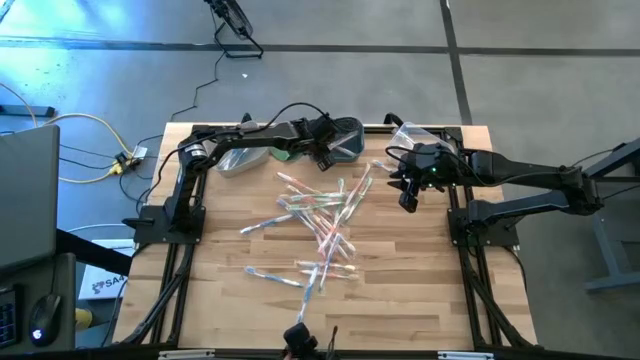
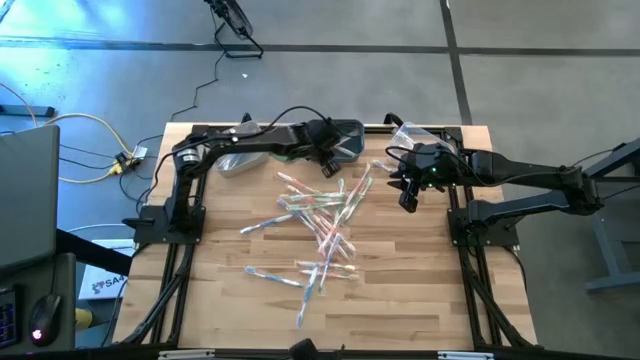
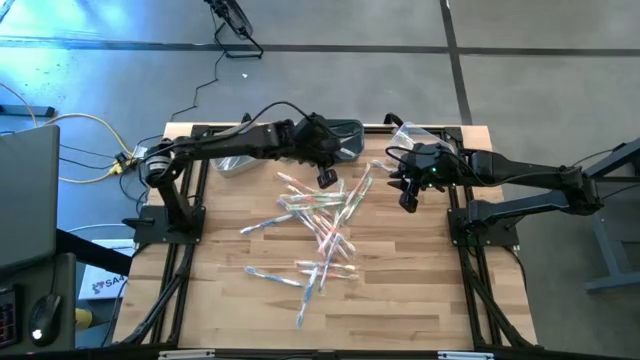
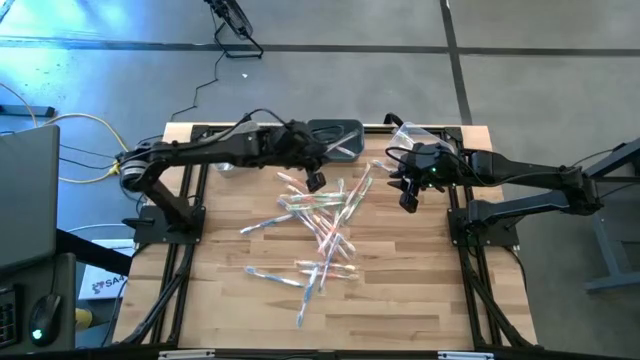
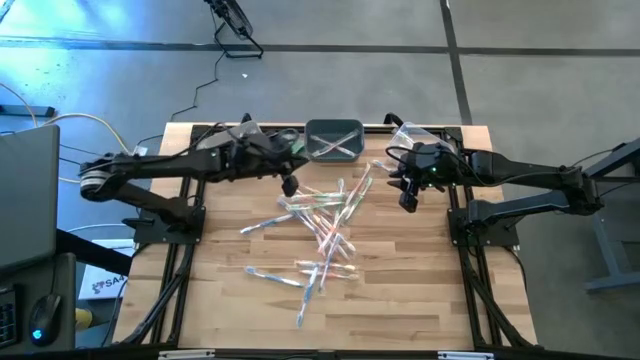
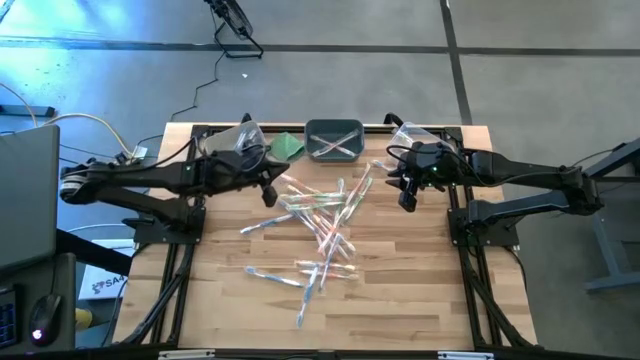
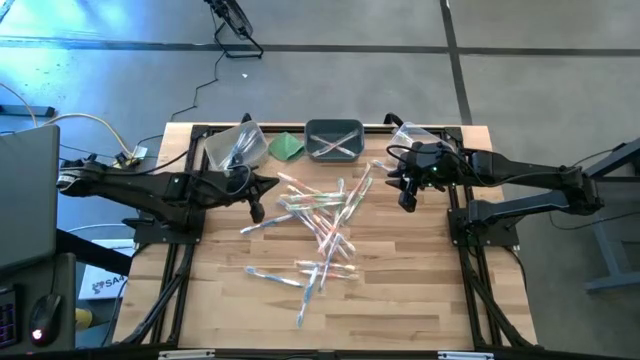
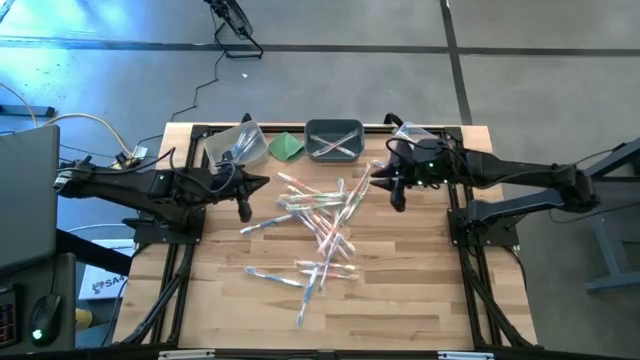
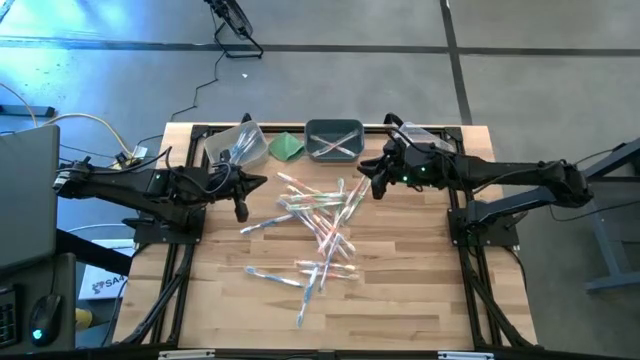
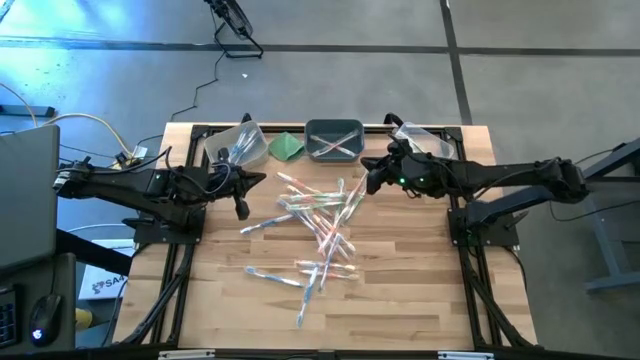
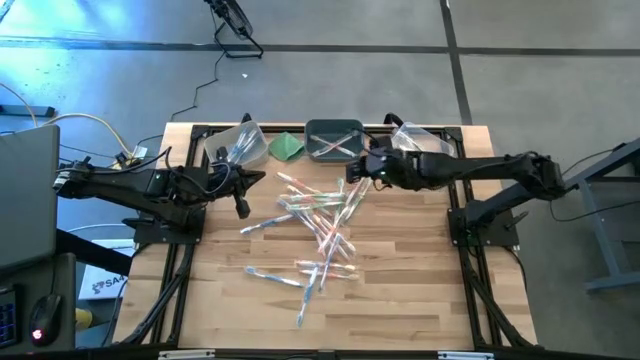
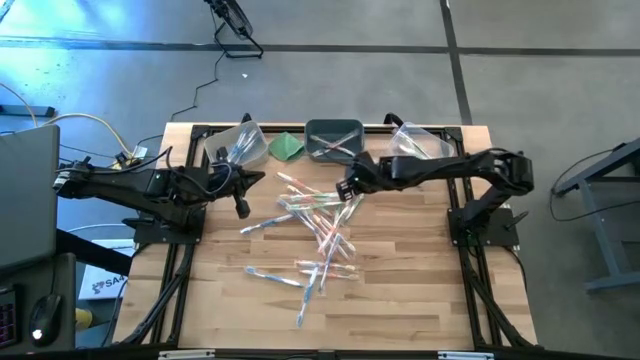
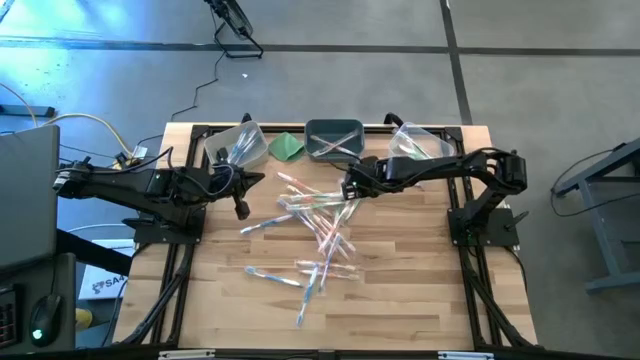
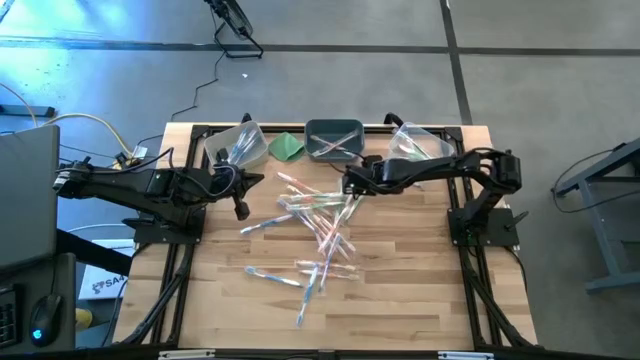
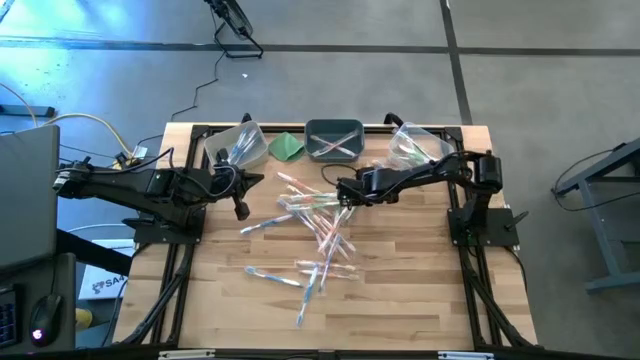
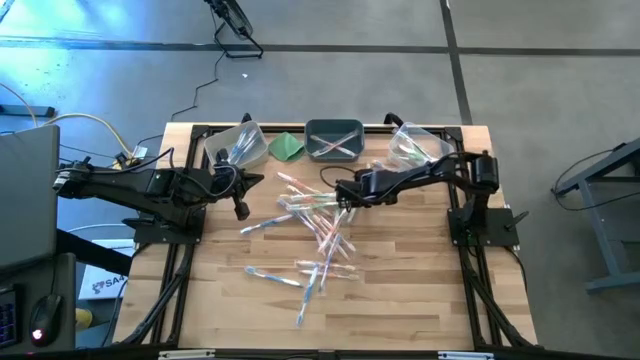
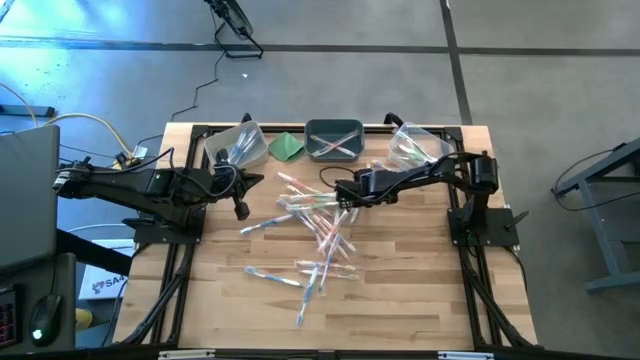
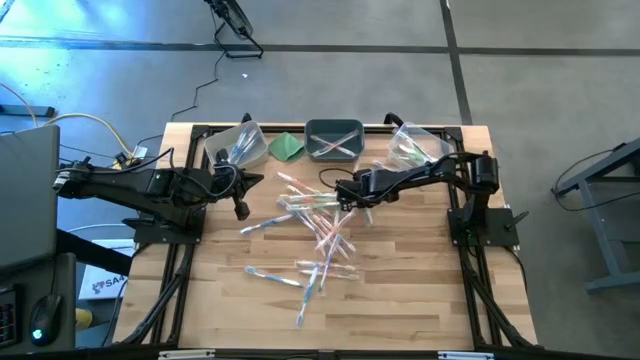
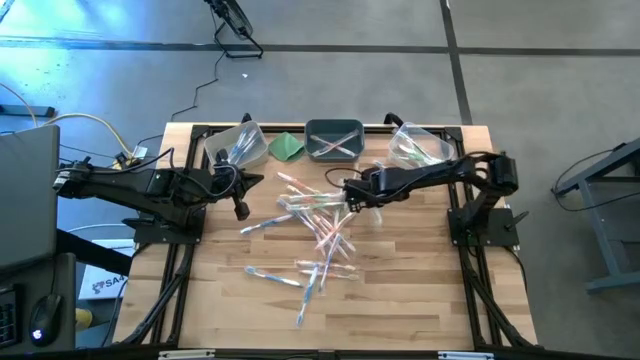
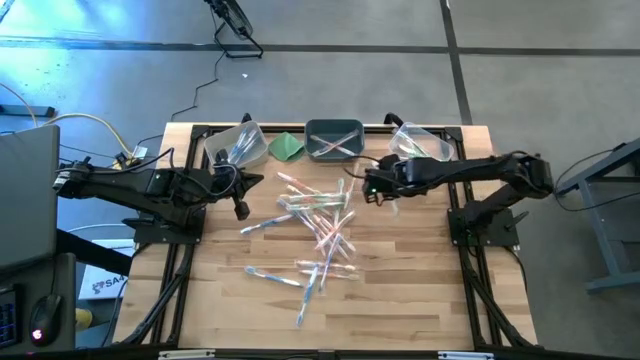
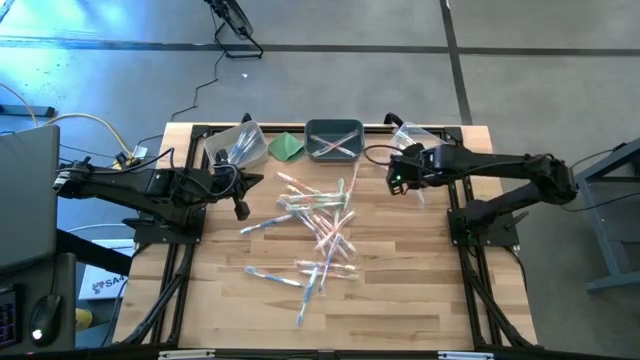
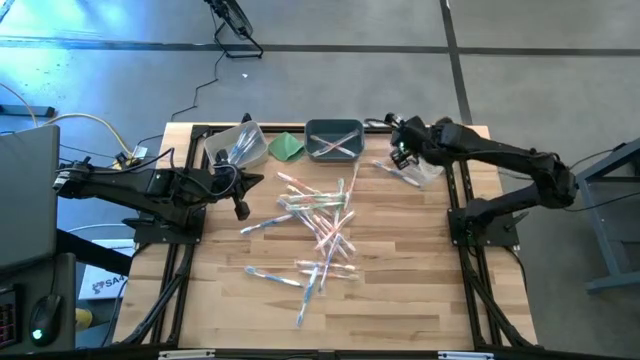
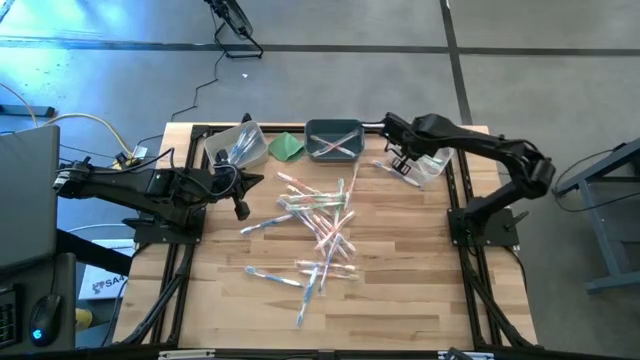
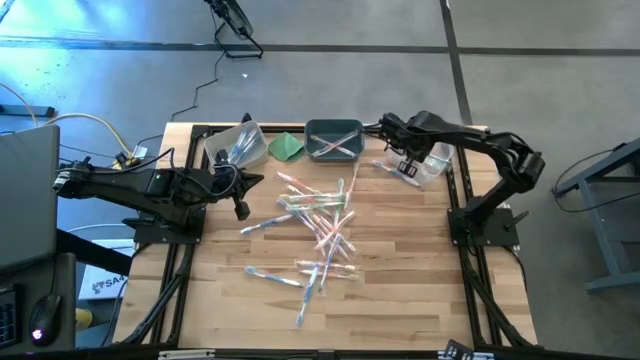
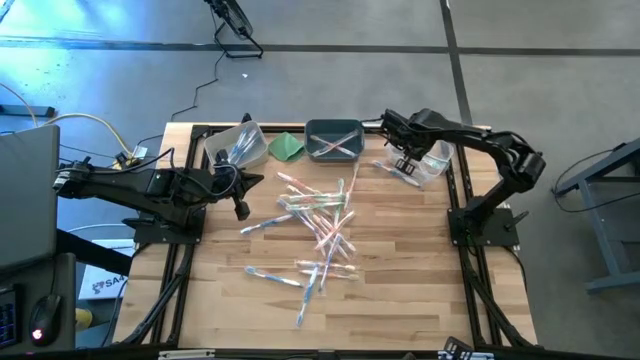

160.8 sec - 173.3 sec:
Task: Pick & Place Toothbrushes
Put the green toothbrush into the transparent bin

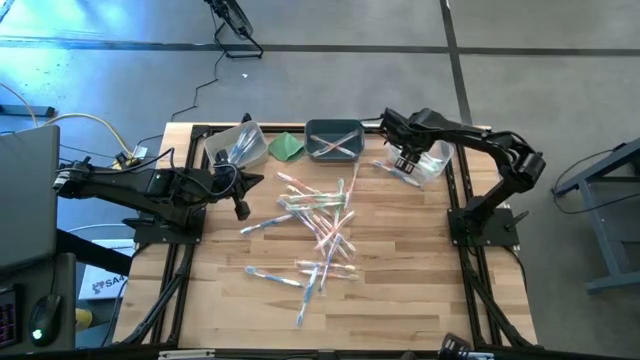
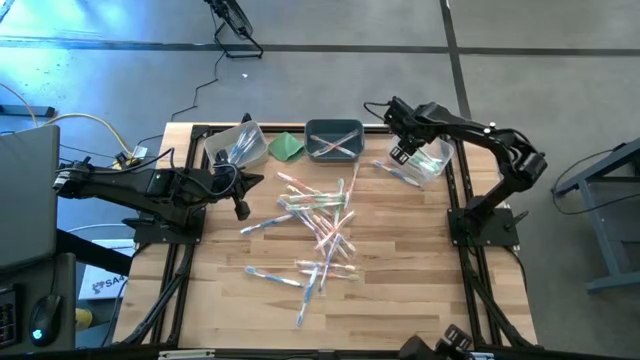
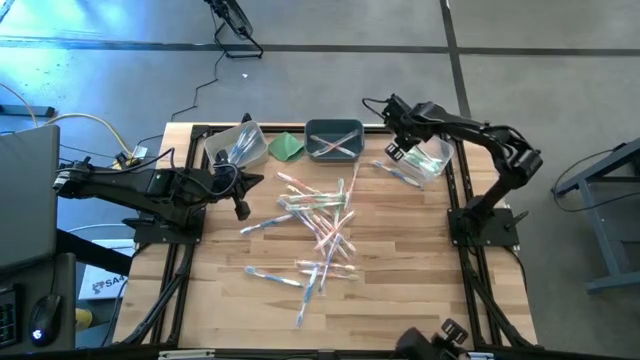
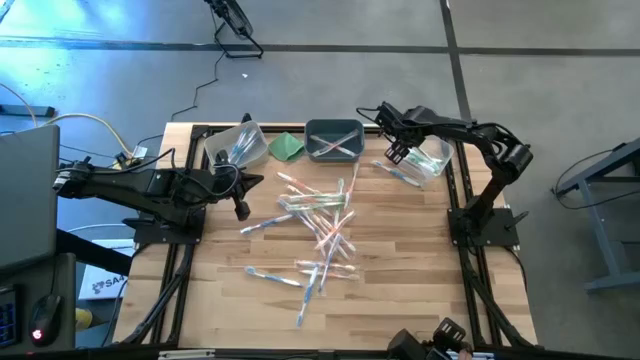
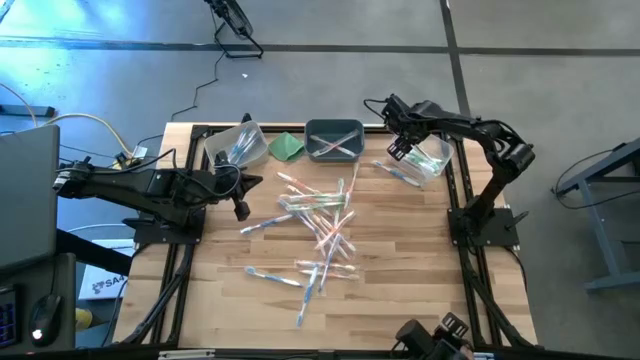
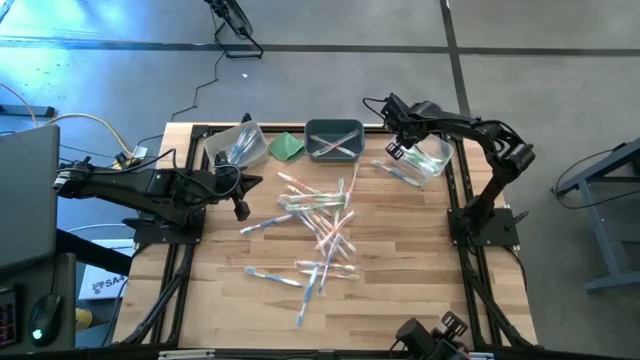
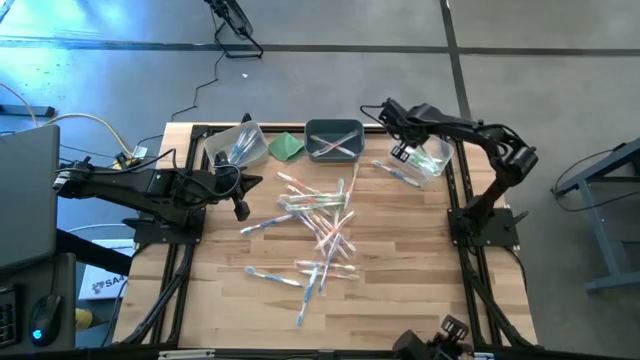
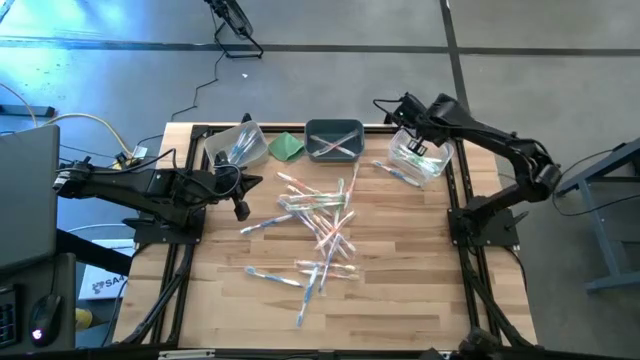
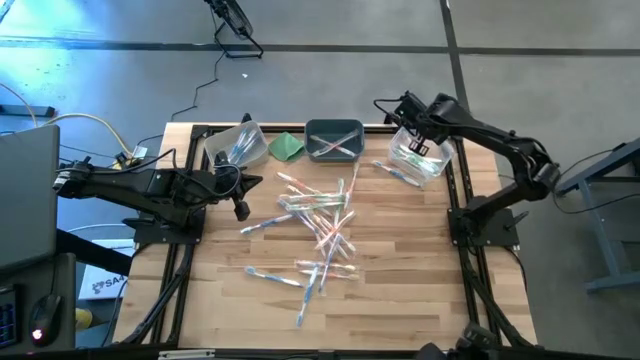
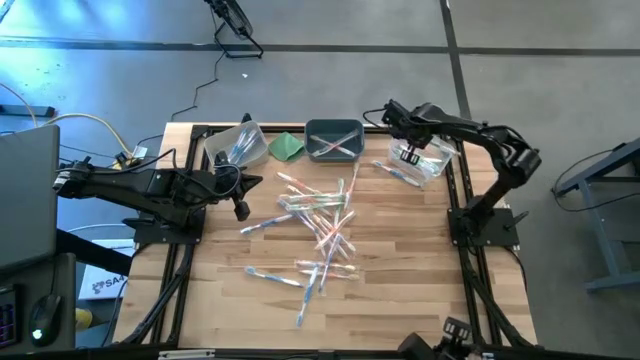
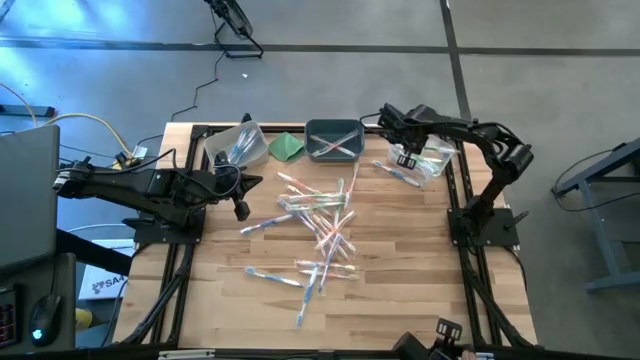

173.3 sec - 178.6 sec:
Adjust the green toothbrush in the transparent bin
